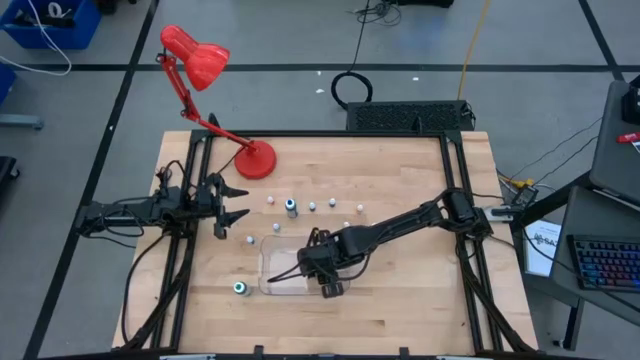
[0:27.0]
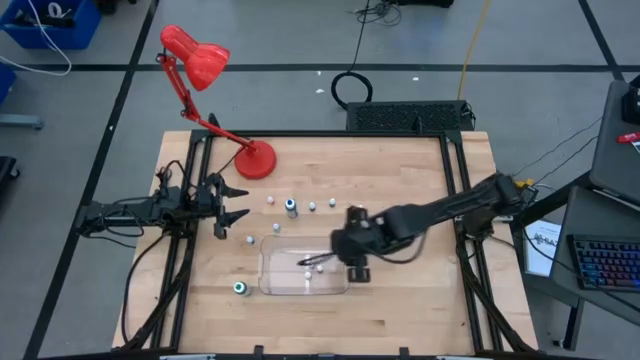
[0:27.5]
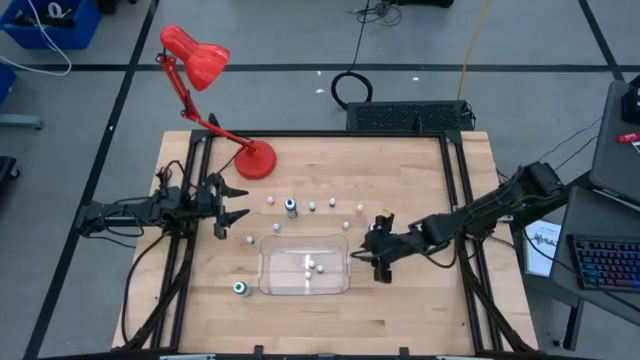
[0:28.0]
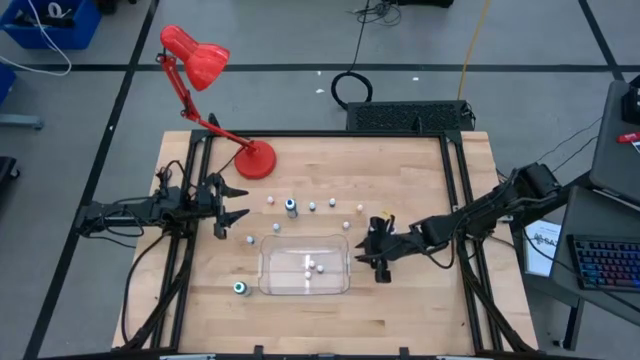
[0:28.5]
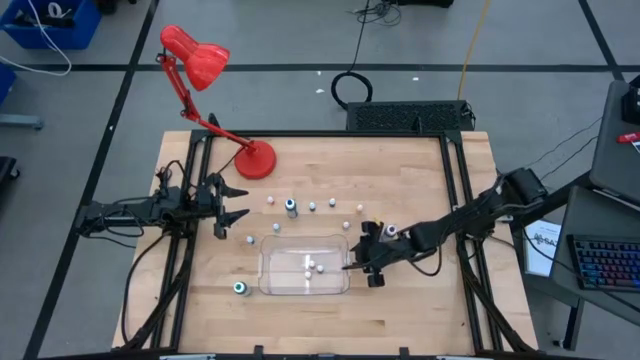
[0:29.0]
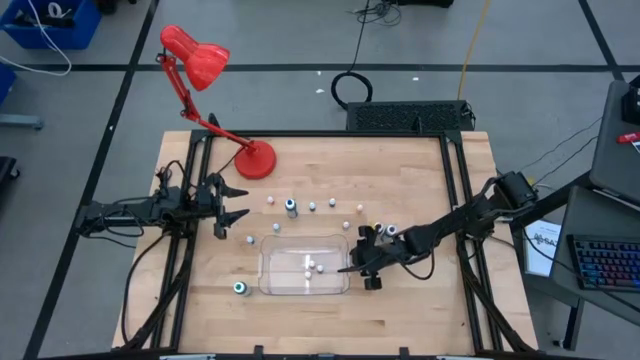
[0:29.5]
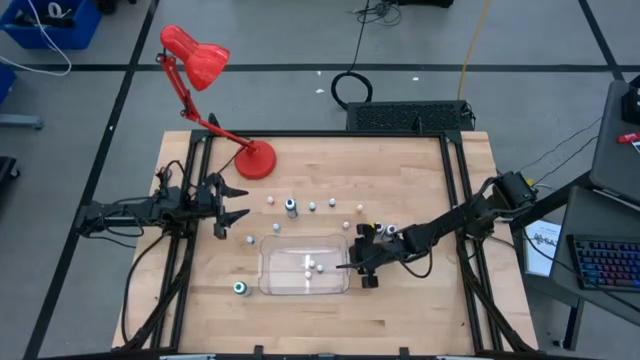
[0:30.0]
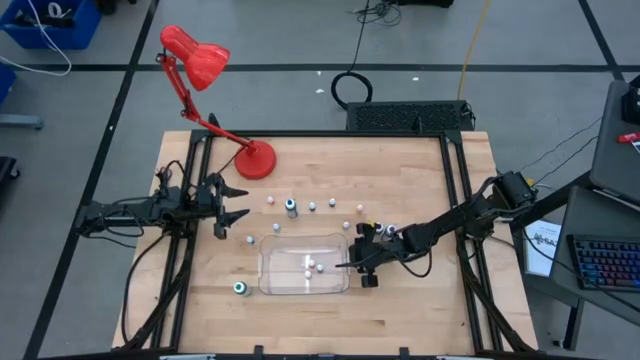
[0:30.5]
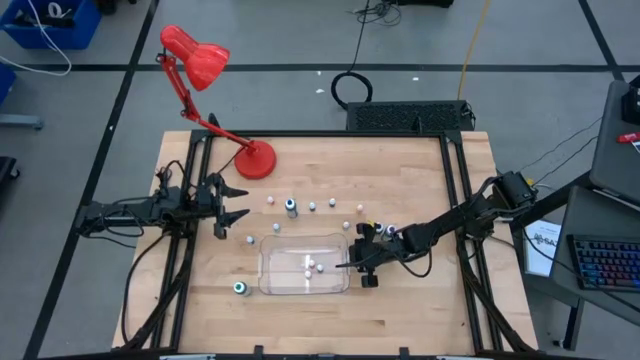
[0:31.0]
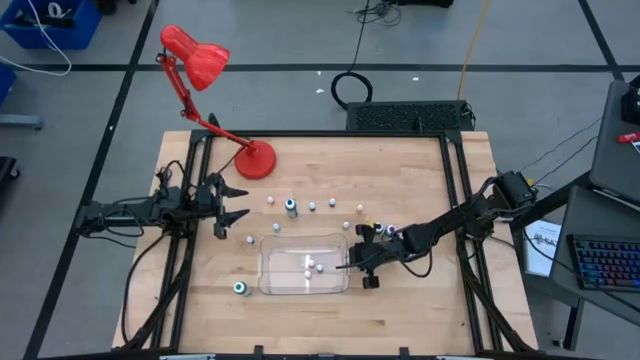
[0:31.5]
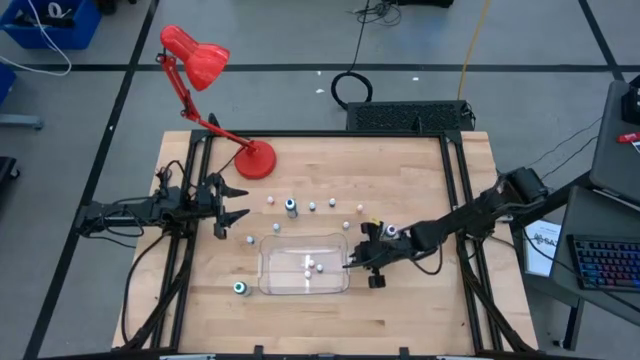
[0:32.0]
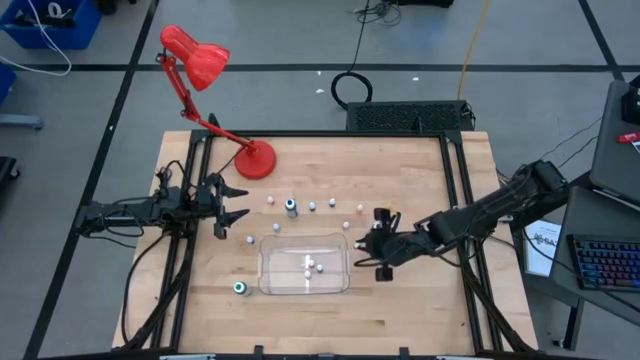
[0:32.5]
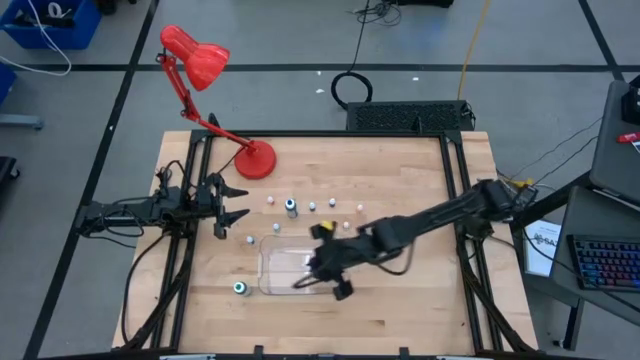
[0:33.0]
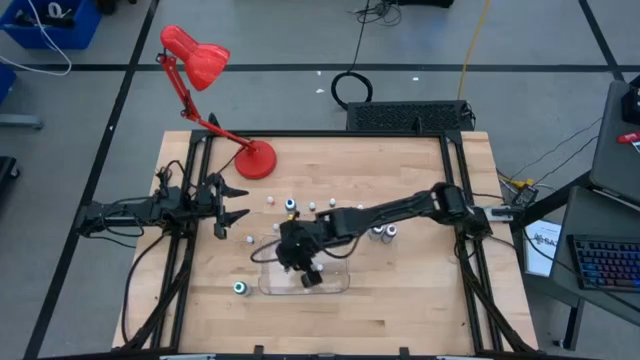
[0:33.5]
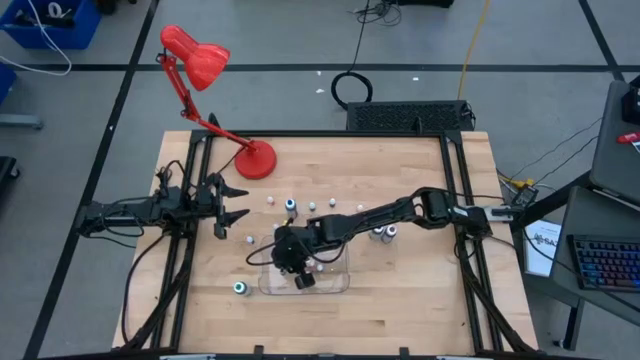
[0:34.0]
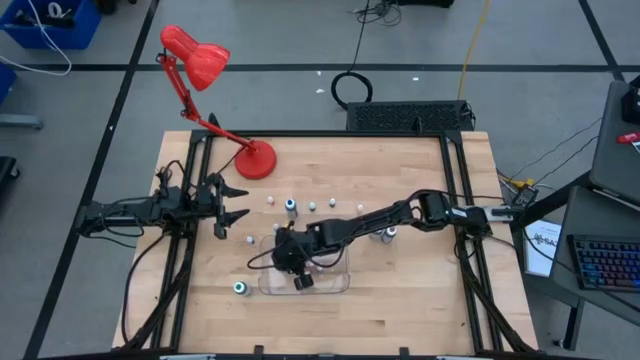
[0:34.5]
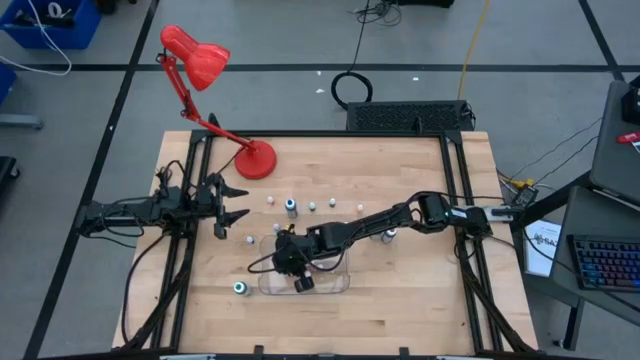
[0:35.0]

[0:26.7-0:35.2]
Task: Pick & Place food coloring
Put the bottom small purple food coloring into the bin

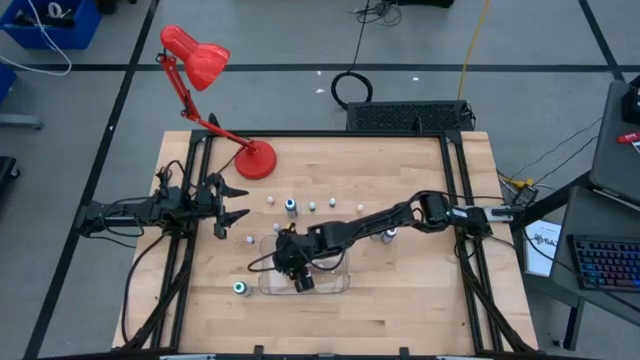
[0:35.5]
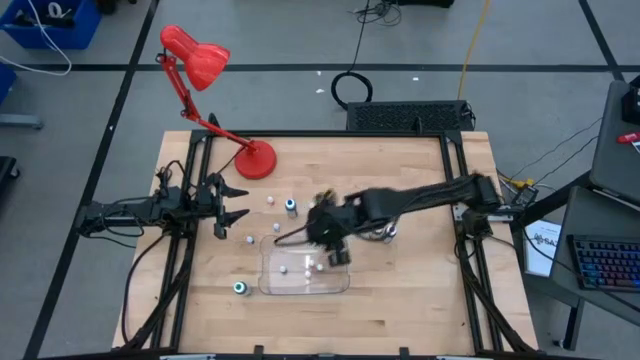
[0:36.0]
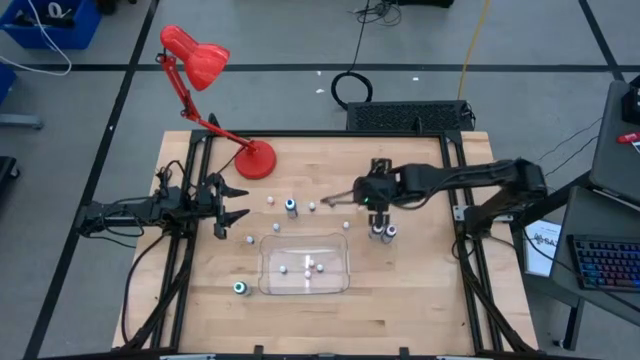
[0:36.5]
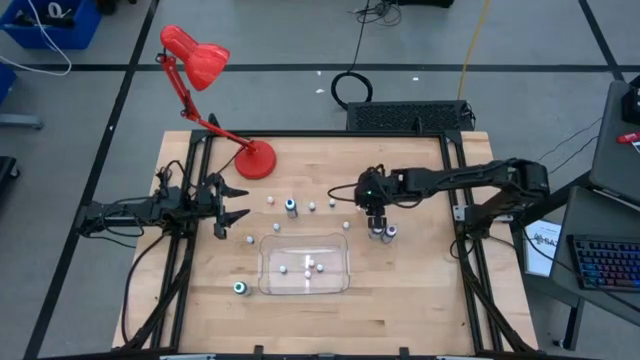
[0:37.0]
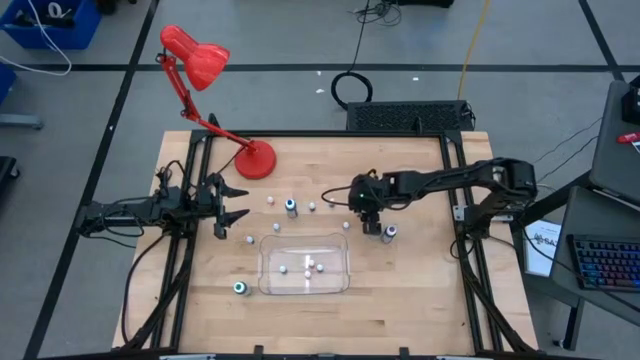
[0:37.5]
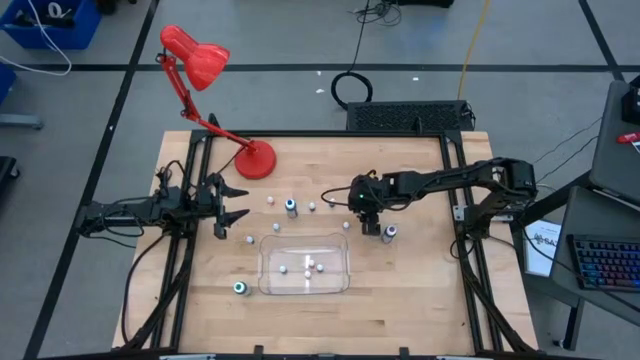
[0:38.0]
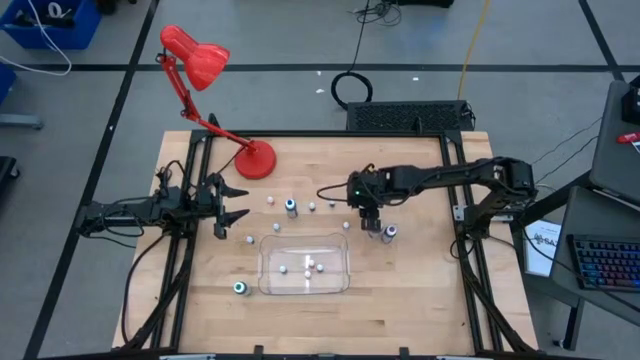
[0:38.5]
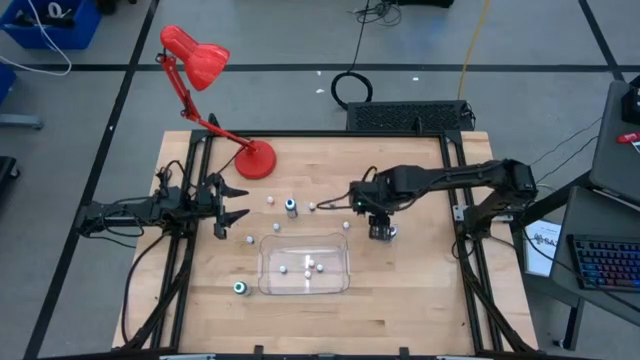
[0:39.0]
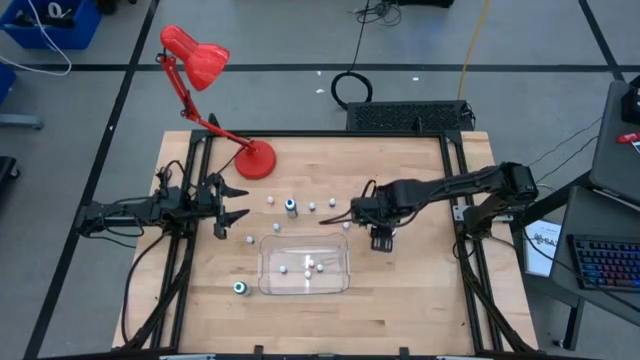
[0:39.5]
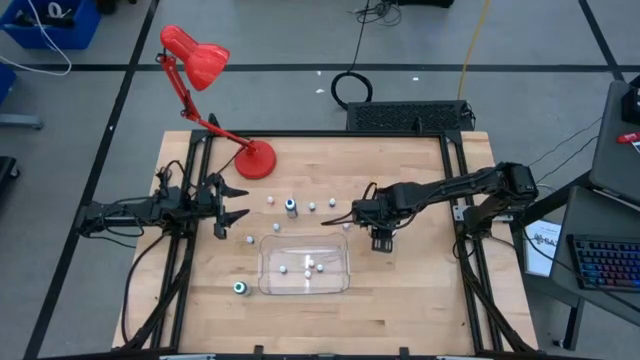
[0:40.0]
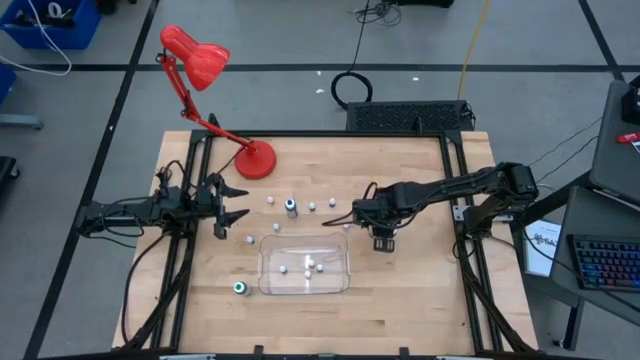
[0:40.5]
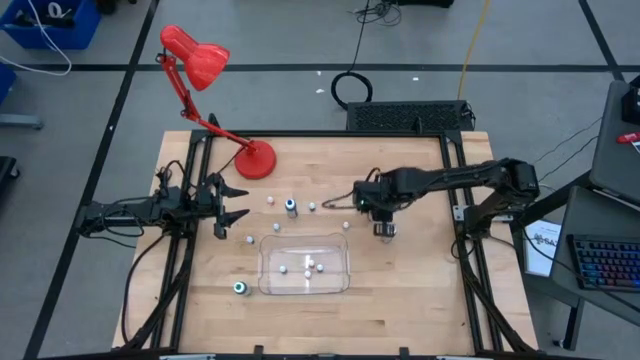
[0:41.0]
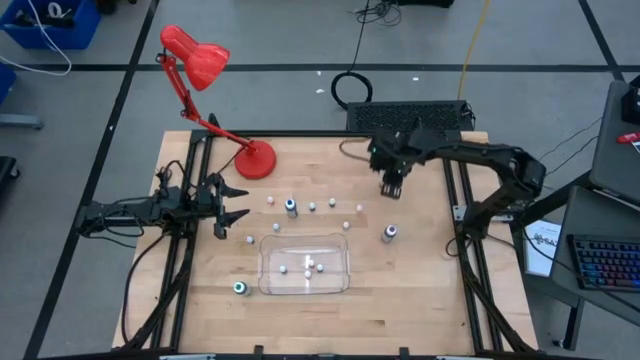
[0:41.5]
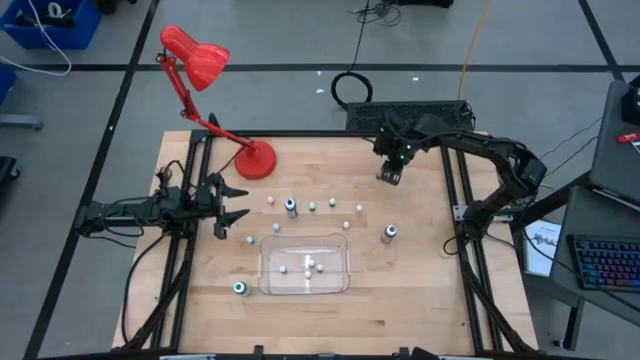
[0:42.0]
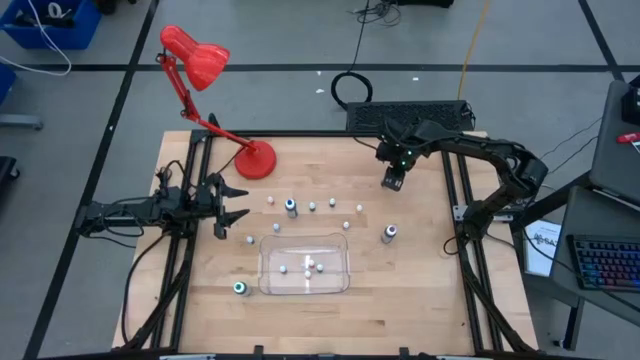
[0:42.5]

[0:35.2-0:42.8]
Move the large black food coloring to the top right of the table

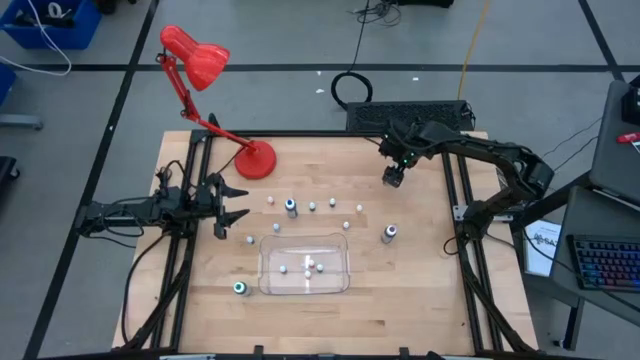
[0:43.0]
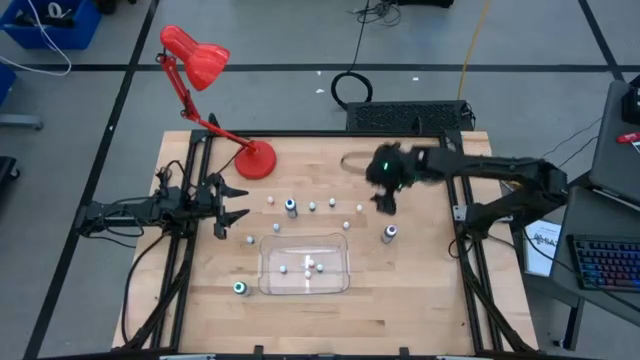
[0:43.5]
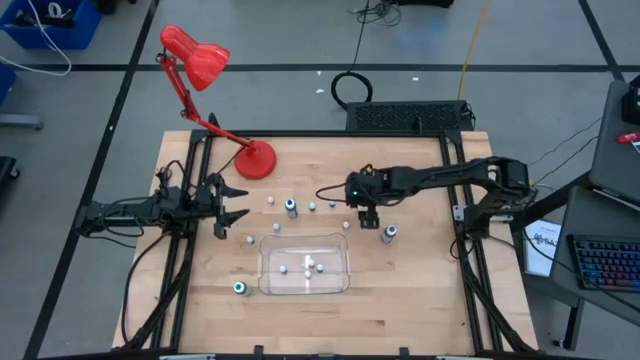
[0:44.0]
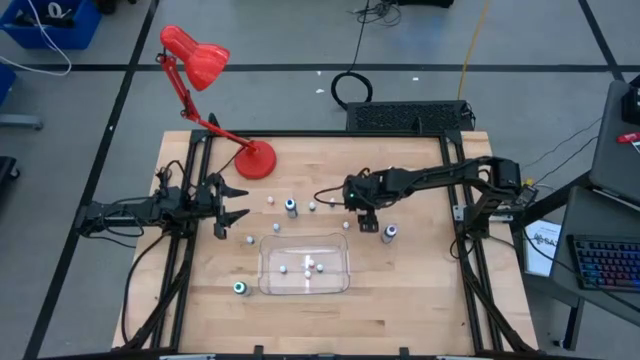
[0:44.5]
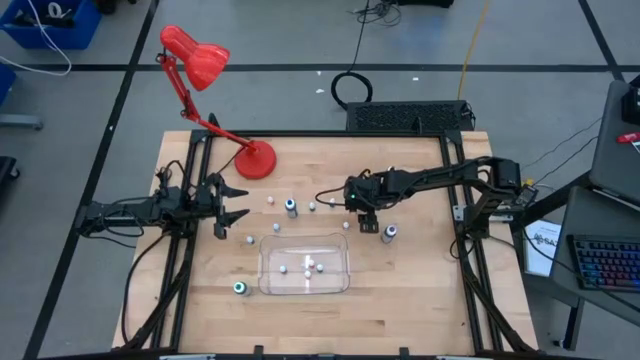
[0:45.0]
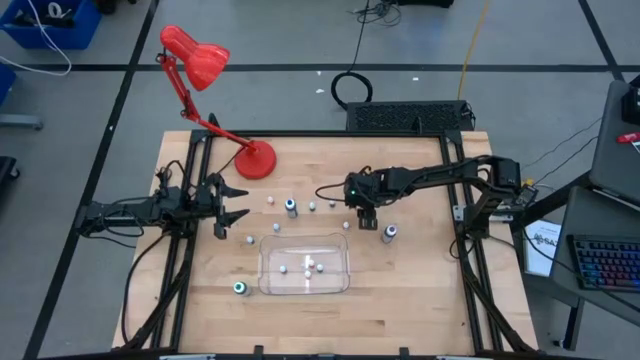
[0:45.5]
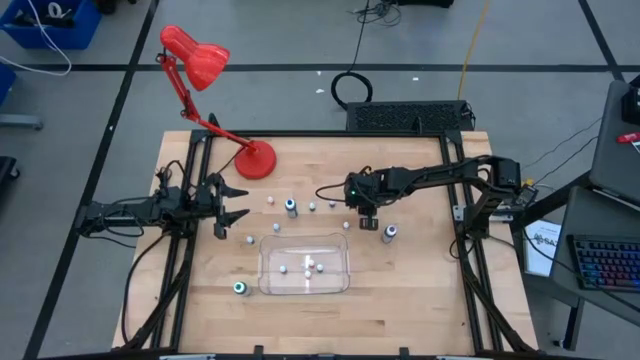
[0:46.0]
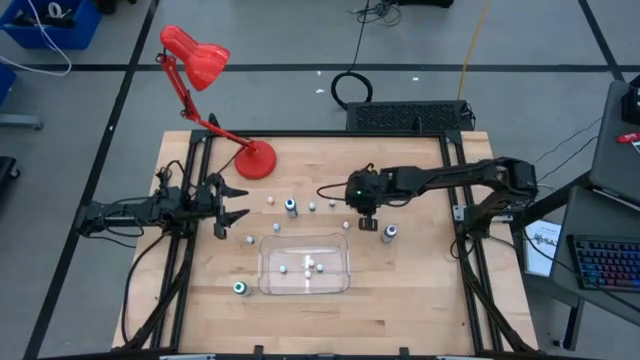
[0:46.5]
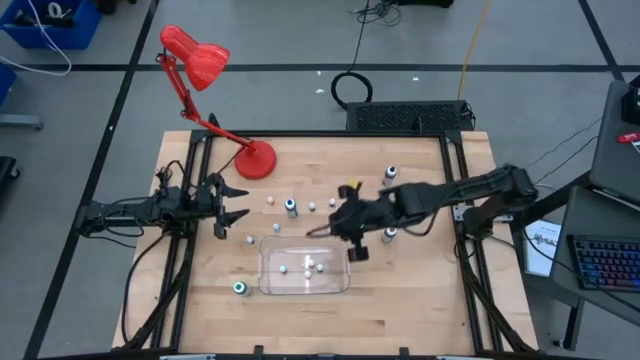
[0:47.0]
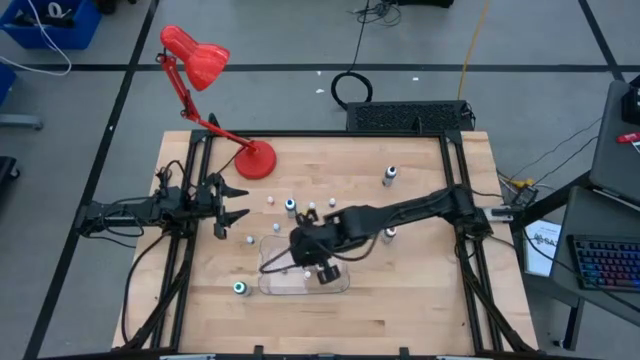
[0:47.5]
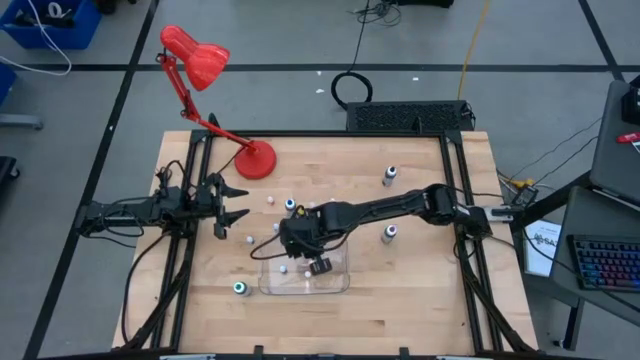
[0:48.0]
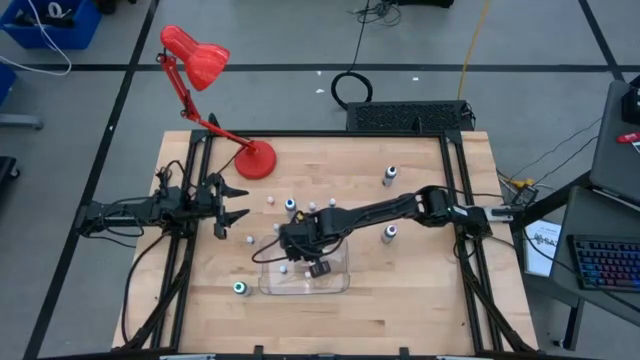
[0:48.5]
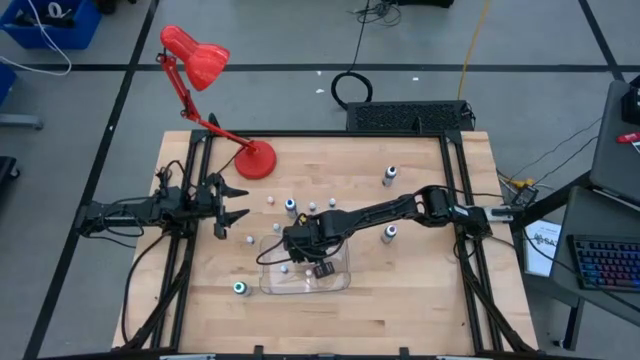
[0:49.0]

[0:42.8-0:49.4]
Put the right small orange food coloring into the bin
